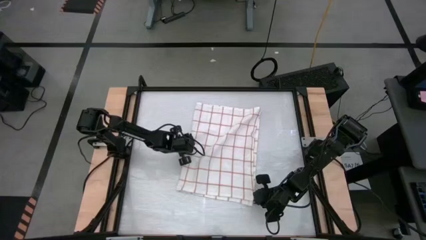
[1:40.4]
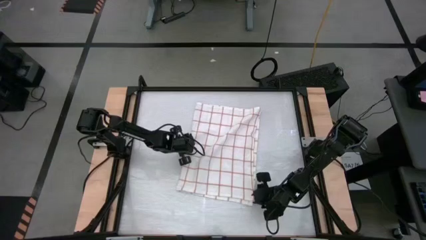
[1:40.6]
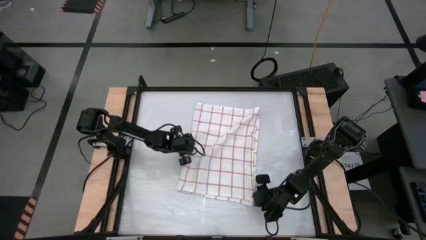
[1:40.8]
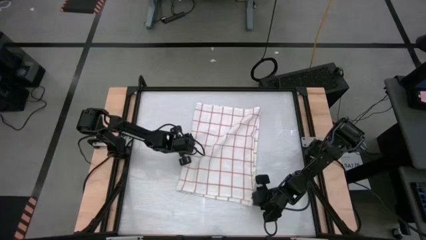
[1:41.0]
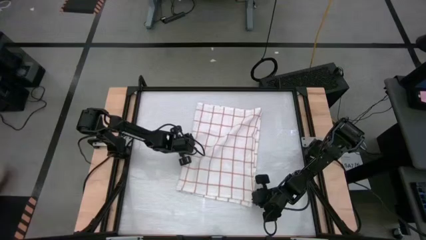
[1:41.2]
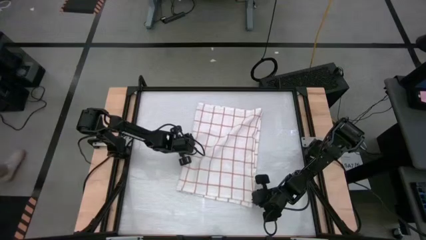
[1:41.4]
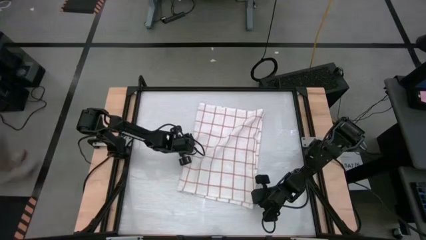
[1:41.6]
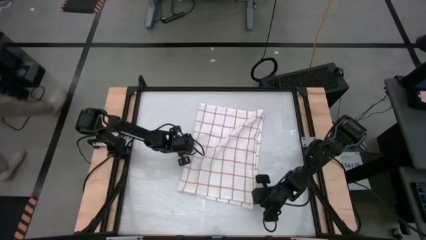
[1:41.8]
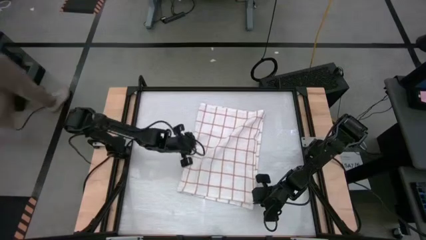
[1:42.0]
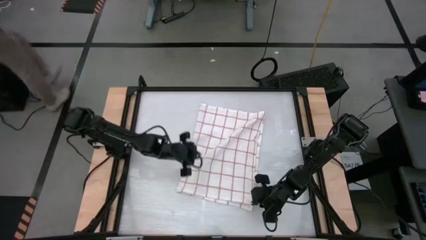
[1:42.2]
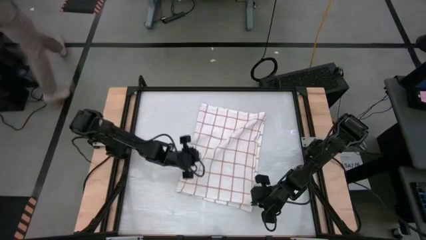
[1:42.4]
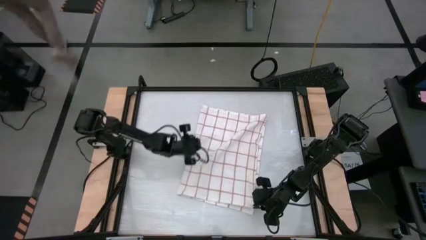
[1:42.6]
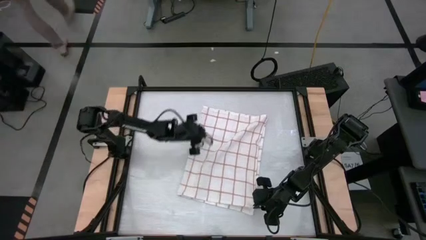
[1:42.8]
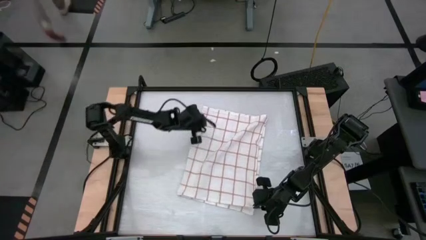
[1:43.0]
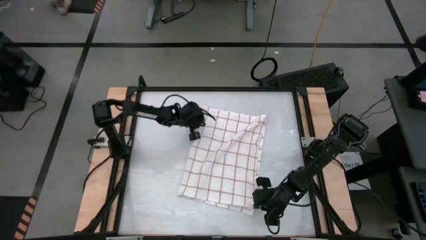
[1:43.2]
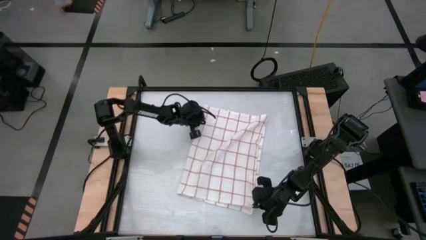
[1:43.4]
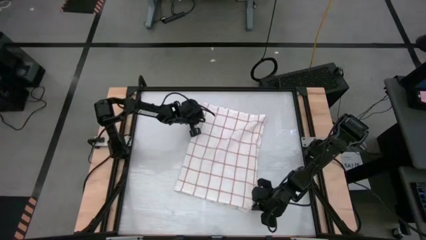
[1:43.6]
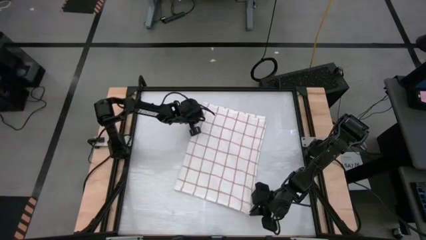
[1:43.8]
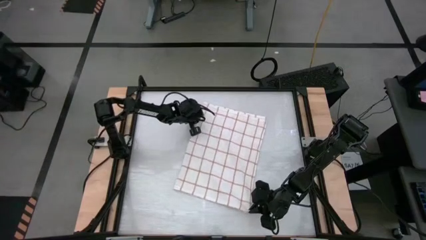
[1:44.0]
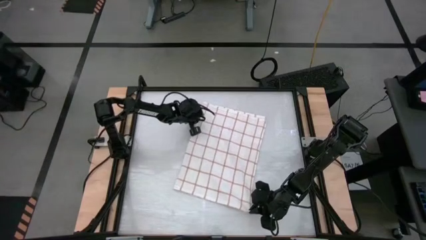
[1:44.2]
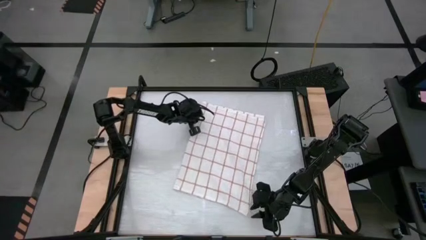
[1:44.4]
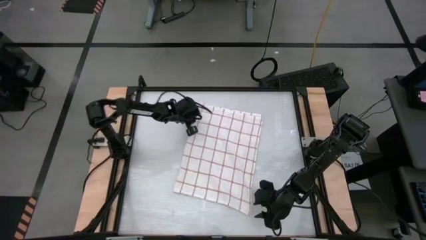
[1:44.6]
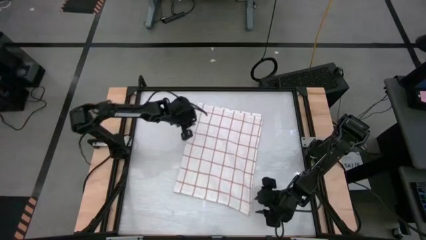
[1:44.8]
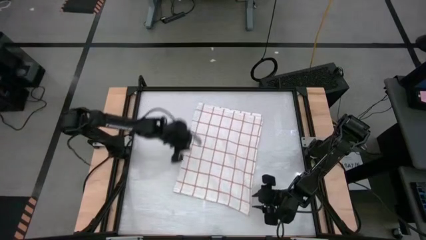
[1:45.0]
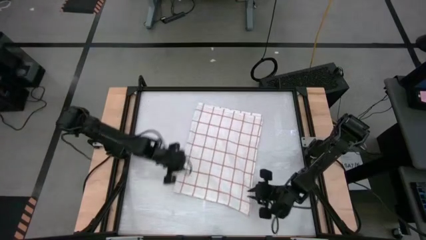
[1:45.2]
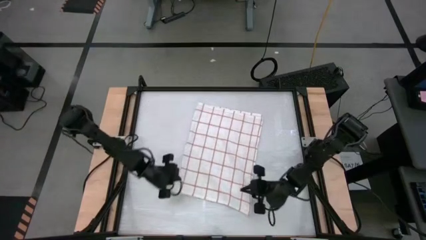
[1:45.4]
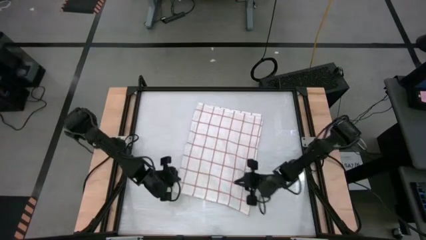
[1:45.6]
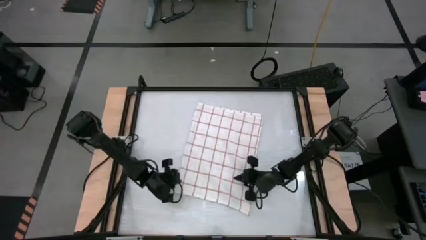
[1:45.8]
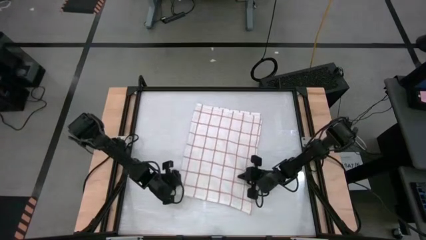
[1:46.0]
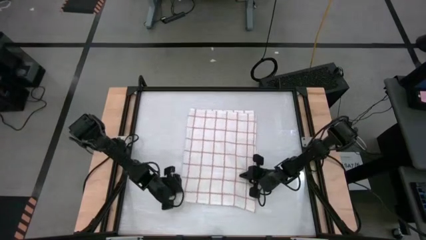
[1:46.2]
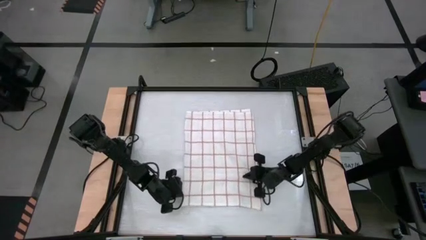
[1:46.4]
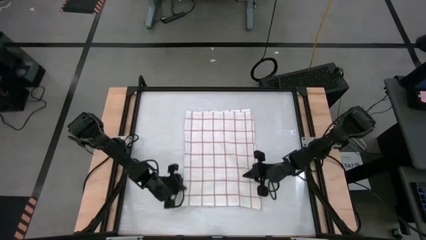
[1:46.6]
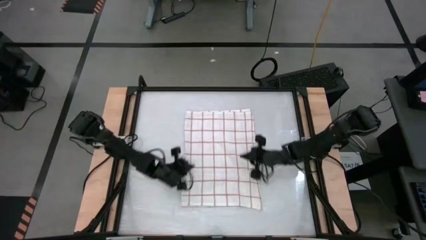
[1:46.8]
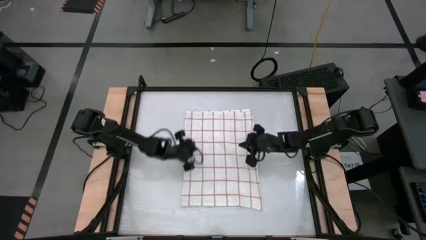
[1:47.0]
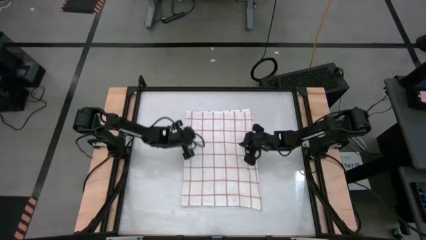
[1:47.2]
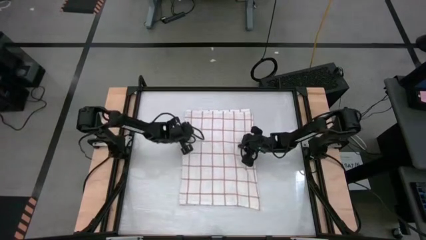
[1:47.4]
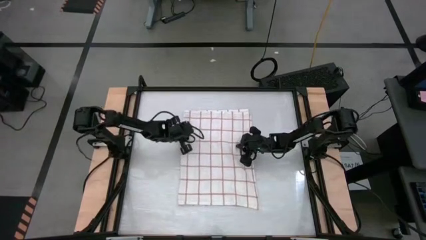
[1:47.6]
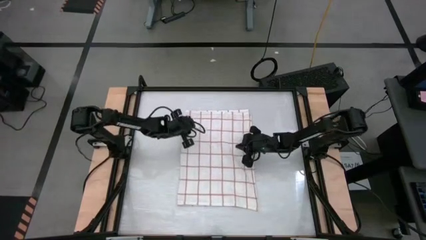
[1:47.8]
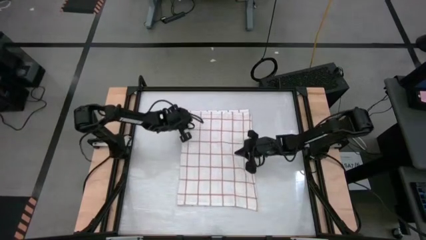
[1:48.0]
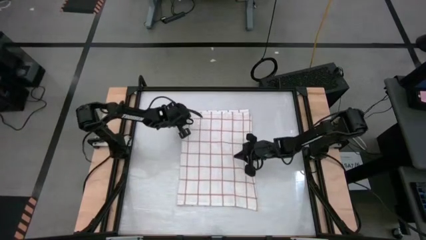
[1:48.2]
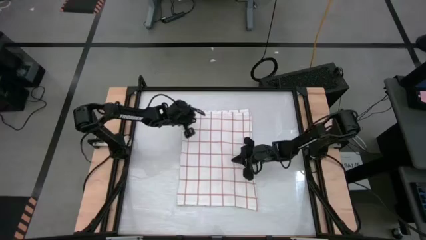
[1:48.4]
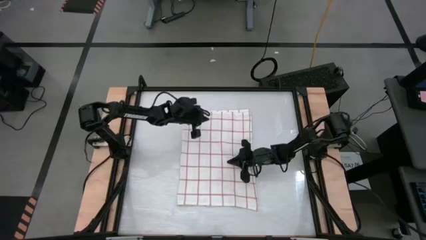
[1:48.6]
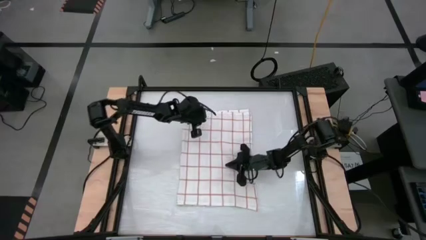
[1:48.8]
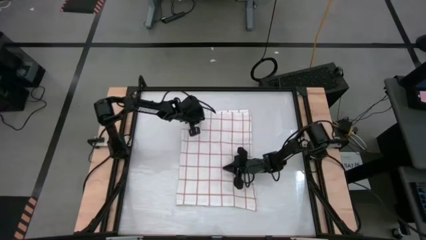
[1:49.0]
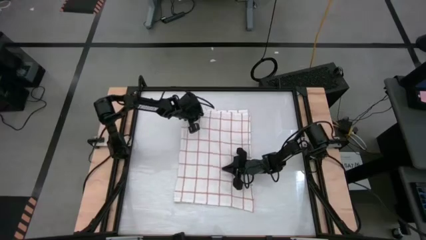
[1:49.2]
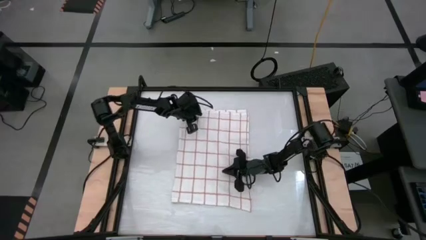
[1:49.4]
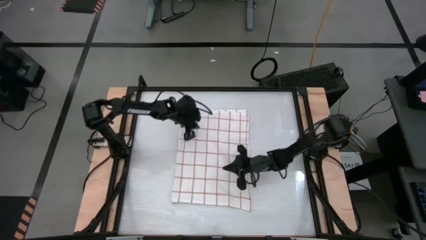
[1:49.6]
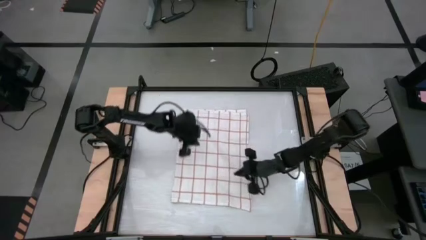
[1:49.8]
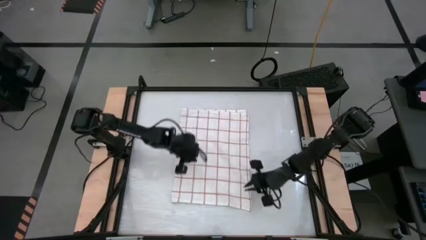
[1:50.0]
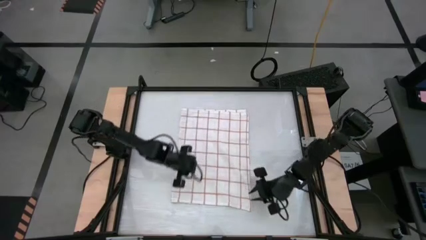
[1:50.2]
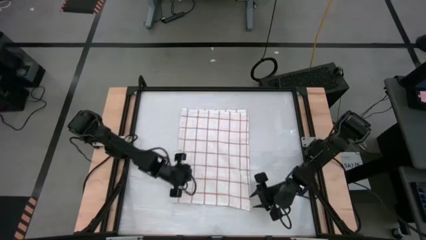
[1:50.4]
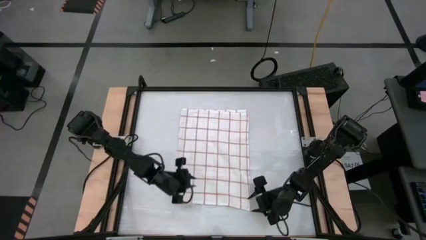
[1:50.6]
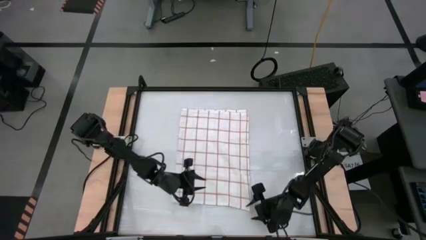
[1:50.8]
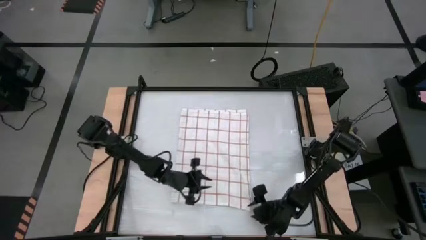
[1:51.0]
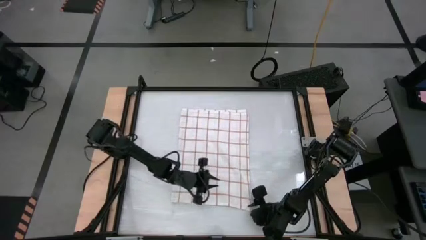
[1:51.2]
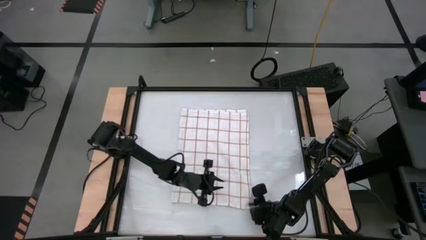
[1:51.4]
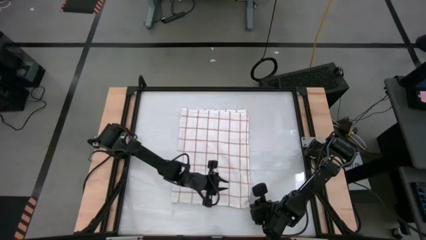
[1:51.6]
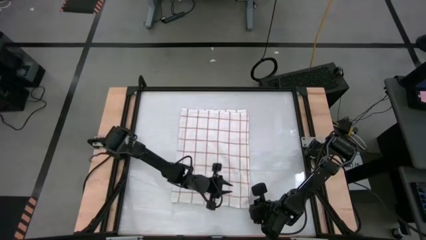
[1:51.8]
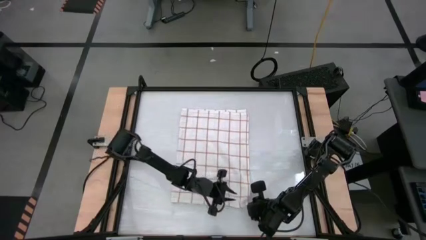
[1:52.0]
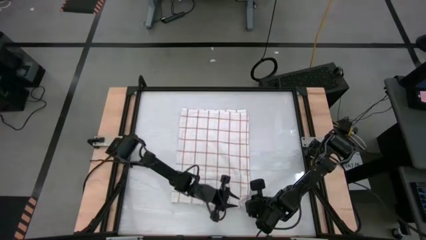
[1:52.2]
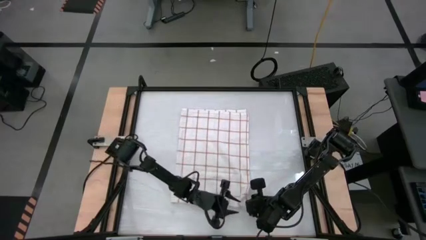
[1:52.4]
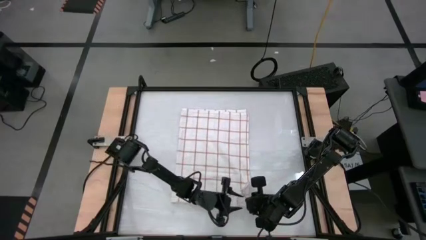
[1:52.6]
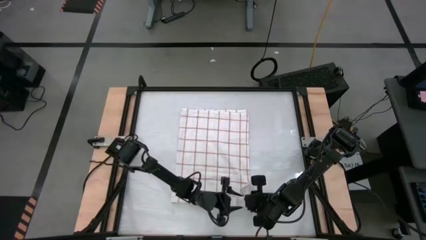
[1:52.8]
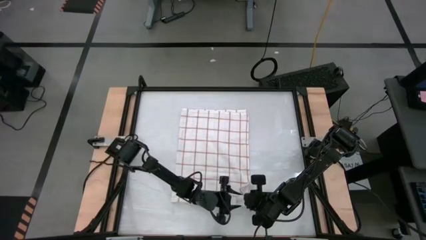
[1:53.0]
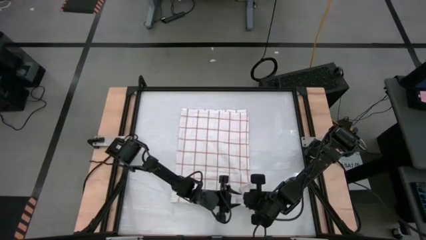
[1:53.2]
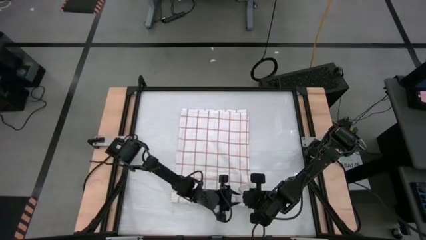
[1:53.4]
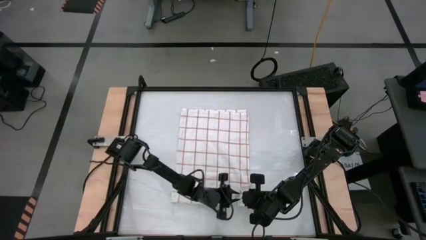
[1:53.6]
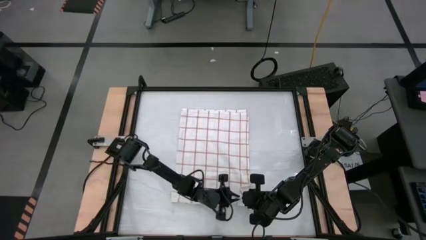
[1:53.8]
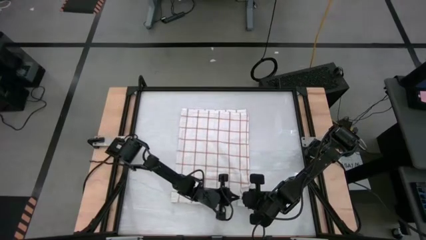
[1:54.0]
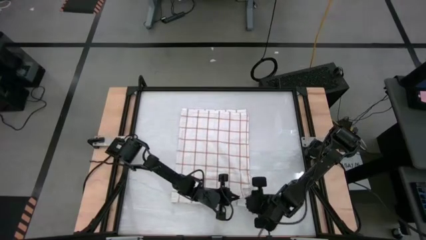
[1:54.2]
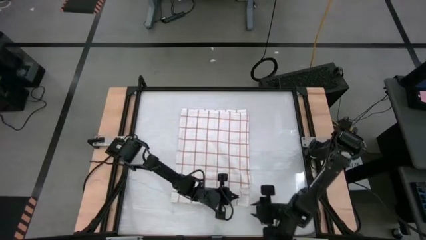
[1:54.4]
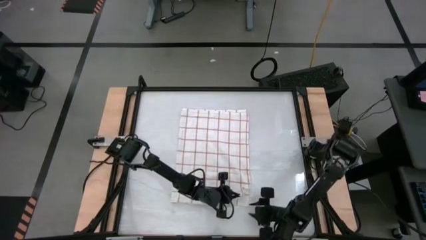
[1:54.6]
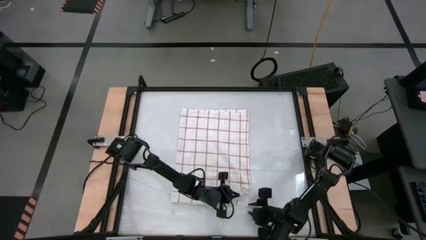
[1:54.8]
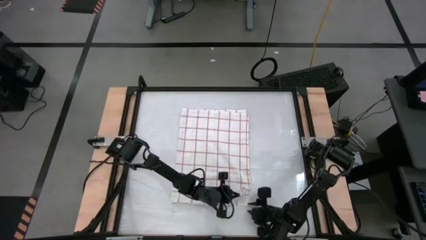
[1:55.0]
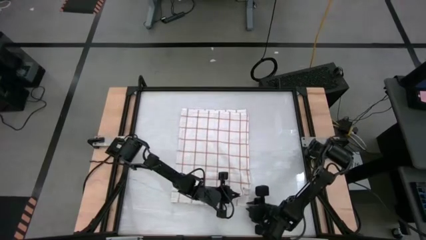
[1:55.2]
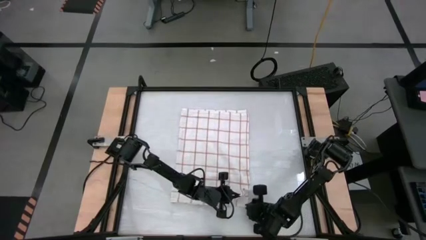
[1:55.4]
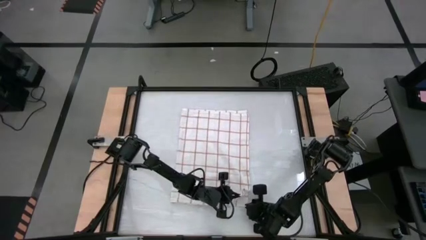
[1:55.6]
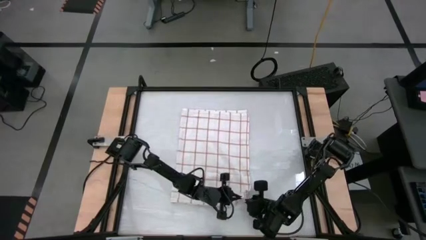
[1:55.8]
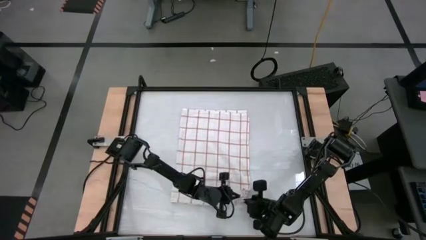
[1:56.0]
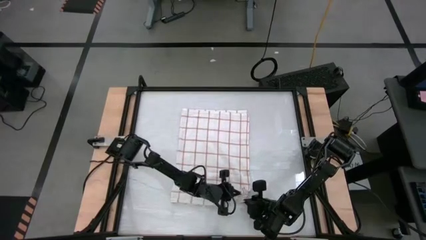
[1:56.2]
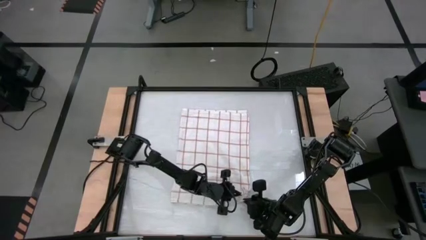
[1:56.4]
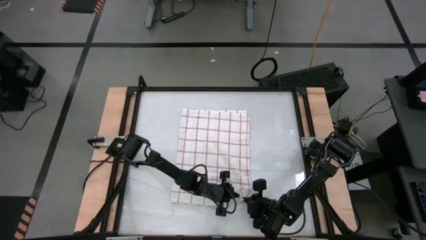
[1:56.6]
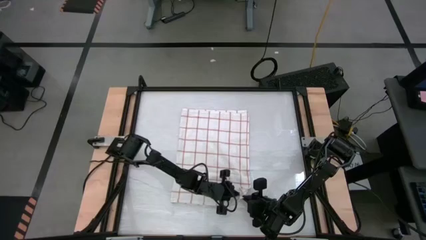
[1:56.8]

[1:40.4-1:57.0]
Task: Roll towel
Fold the white checkered towel
